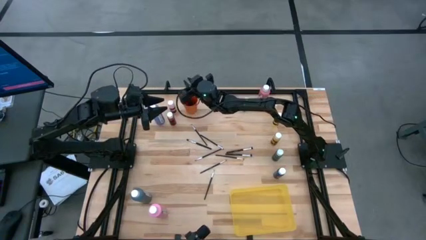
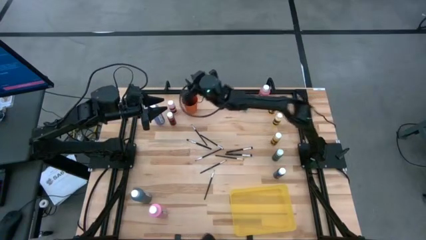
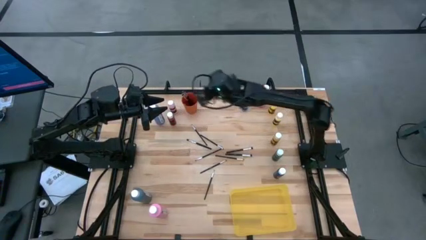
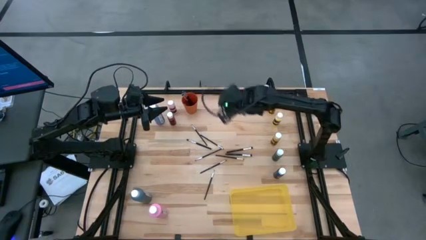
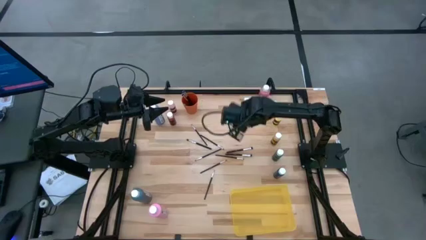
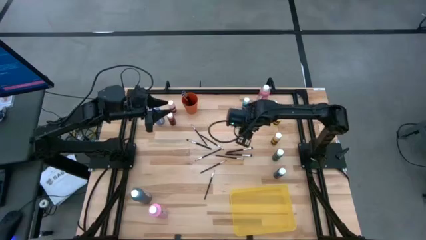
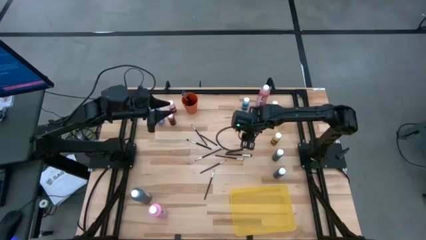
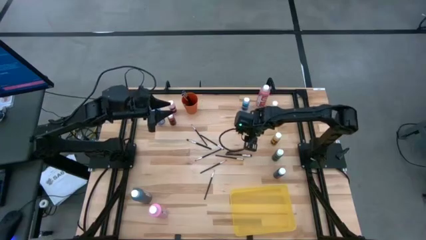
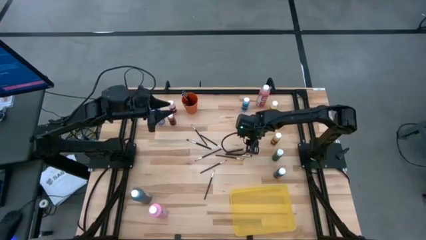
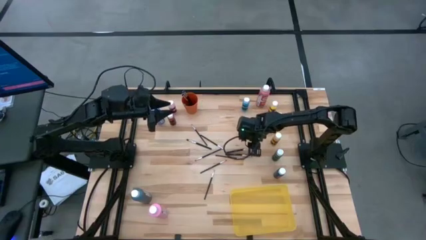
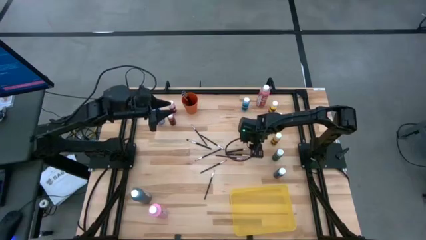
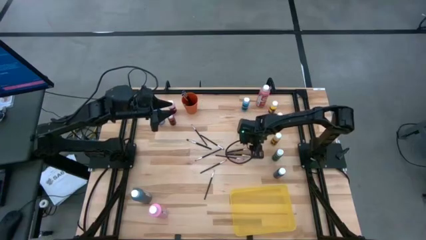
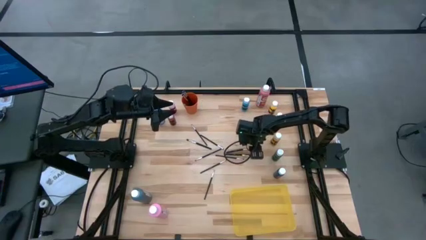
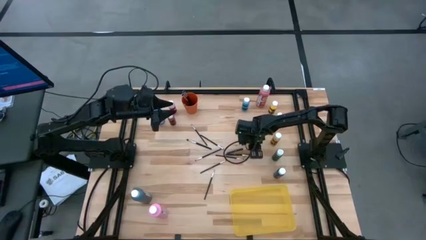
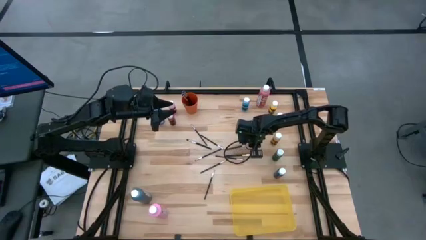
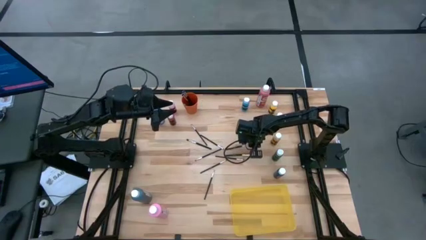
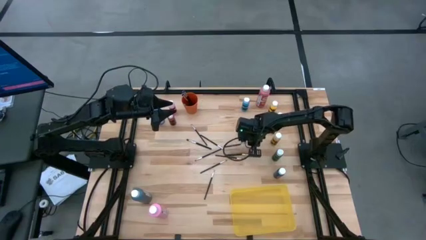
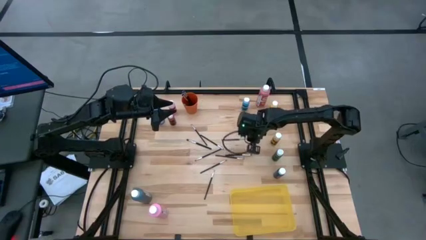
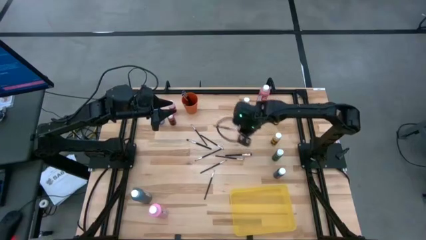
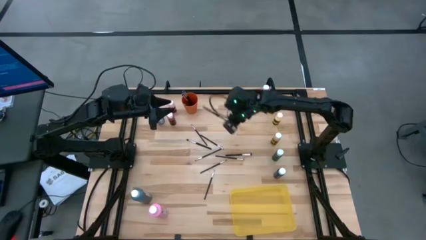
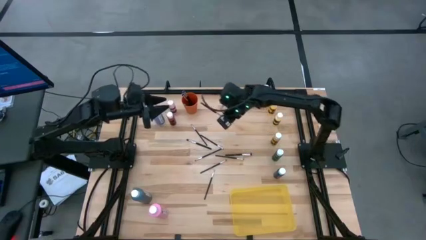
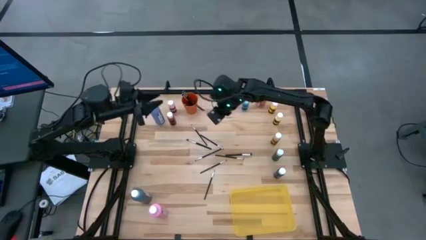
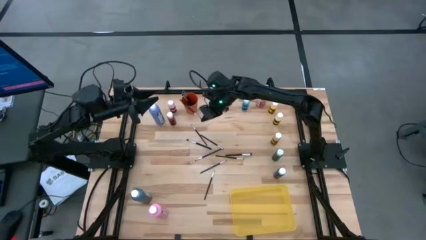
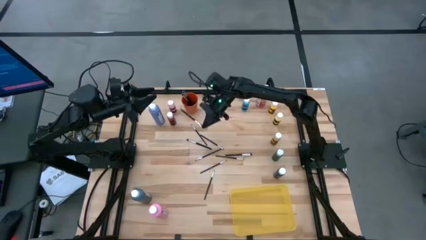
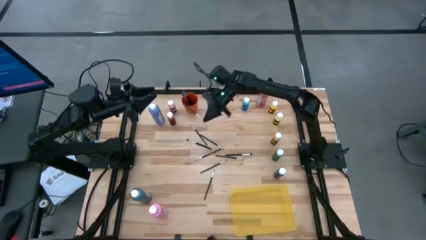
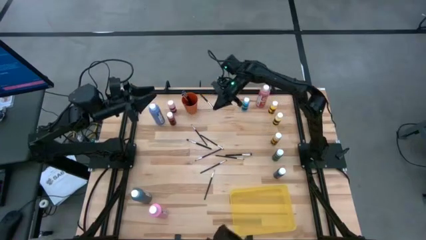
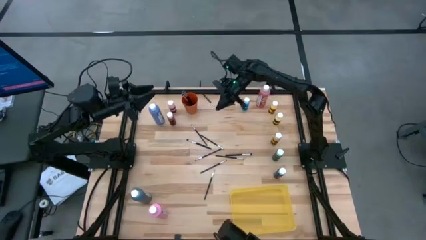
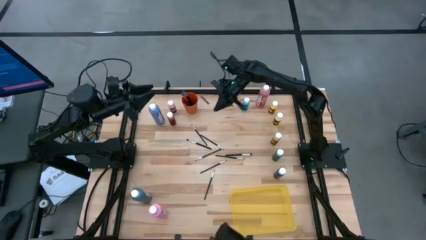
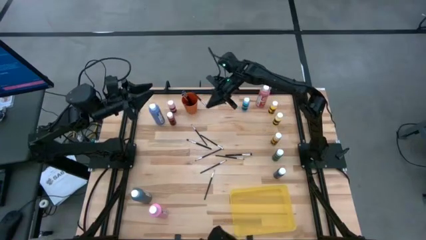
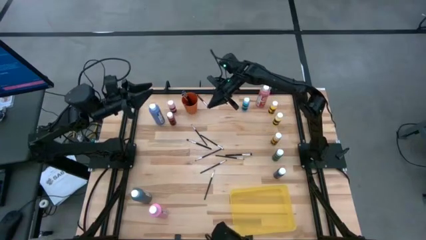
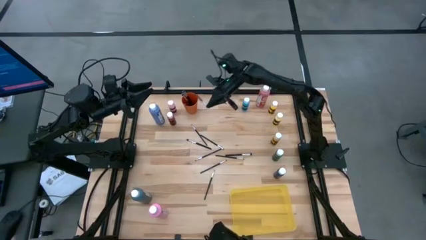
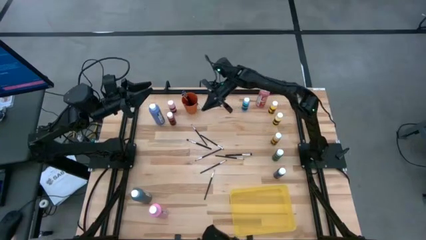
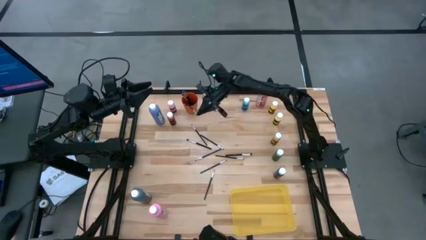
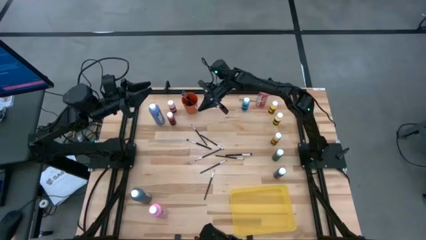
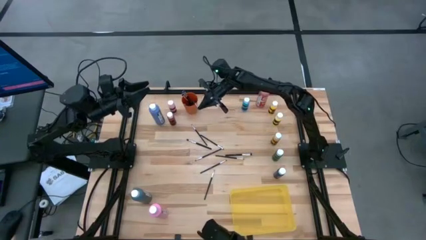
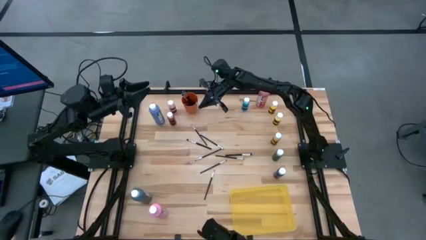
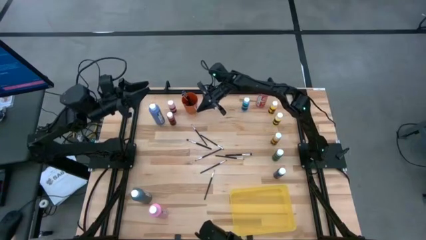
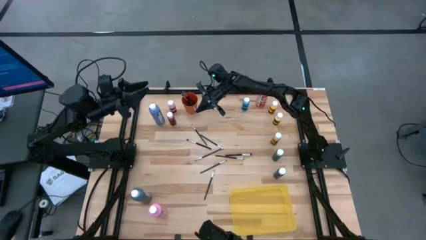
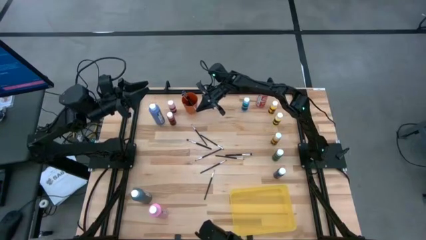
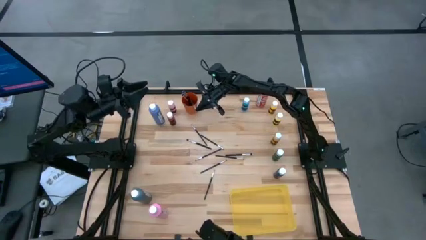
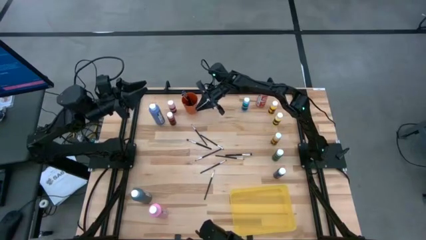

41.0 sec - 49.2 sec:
Task: Pick & Place Paint Supplies
Put the black paint brush into the orange cup

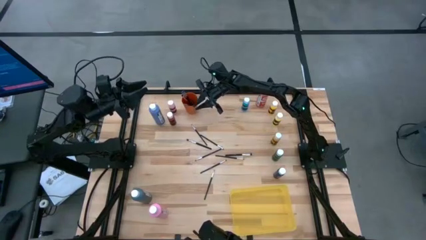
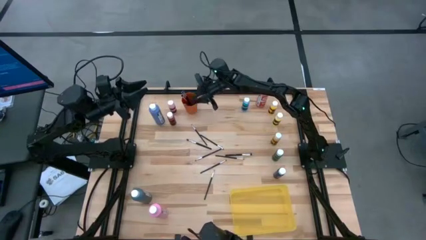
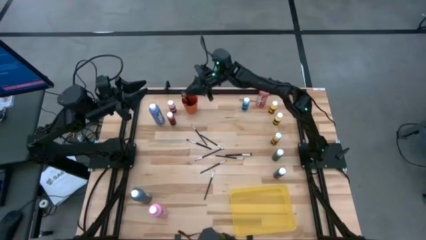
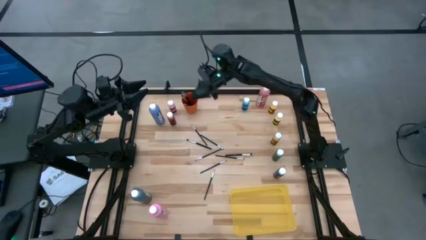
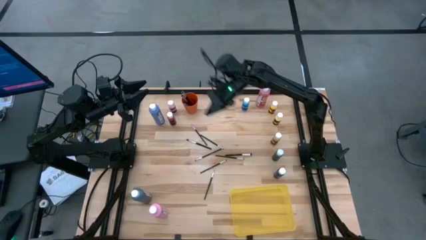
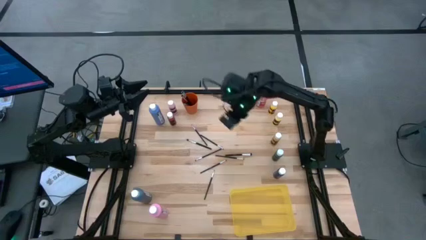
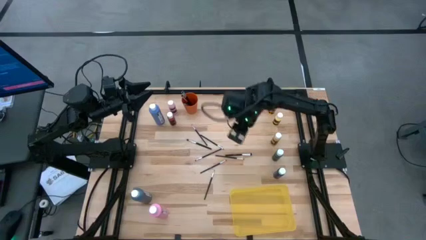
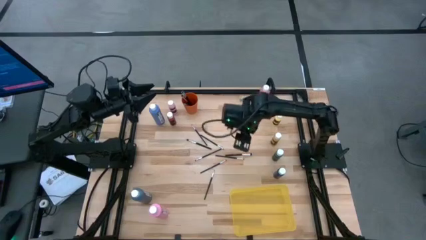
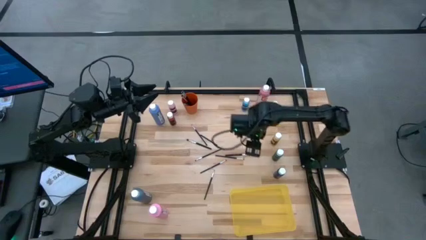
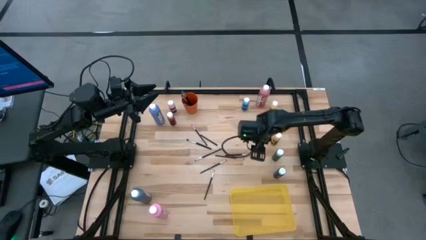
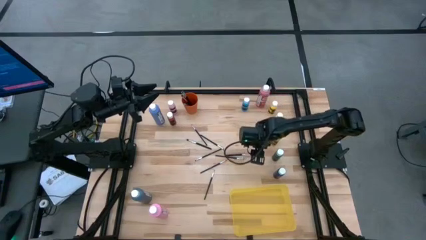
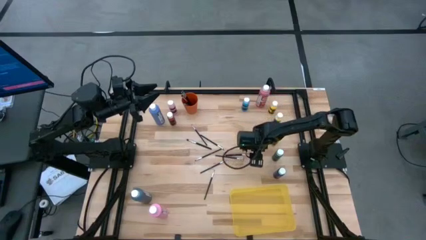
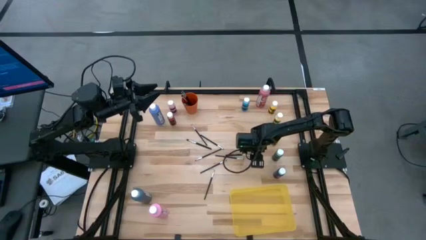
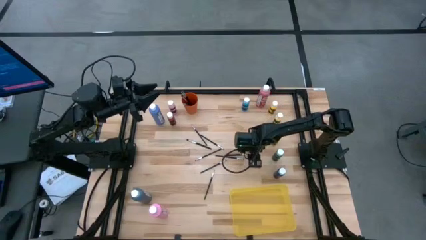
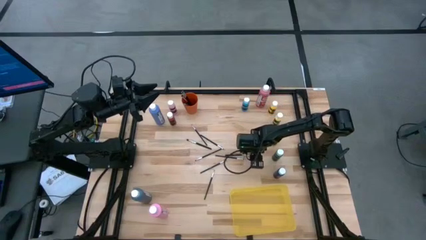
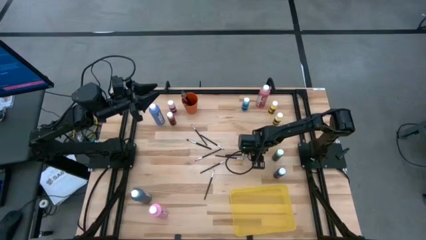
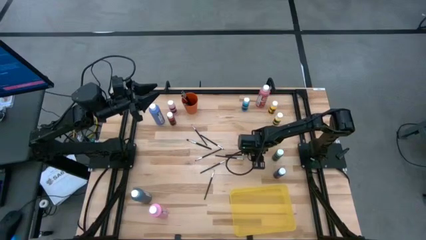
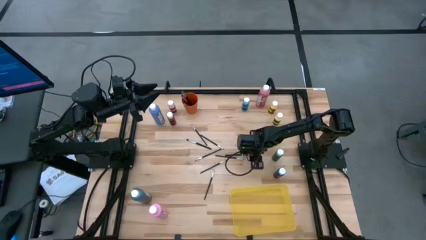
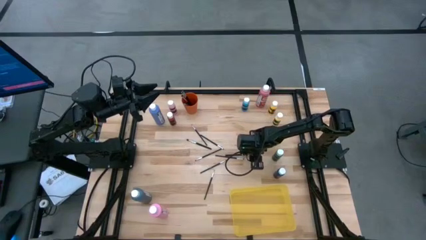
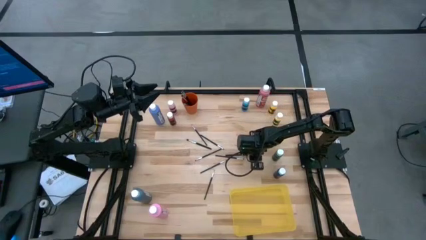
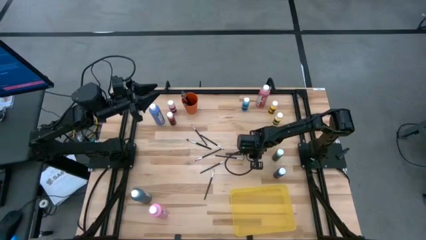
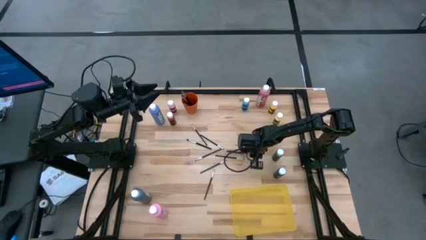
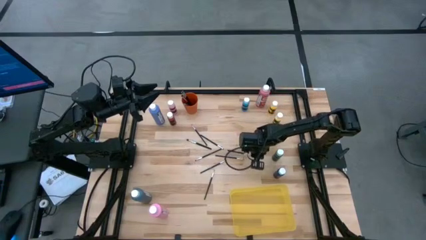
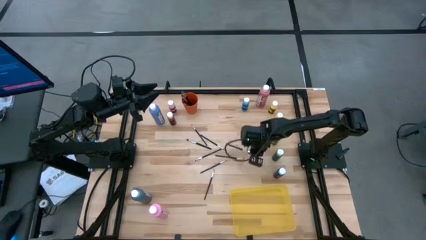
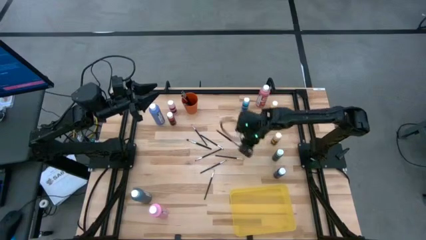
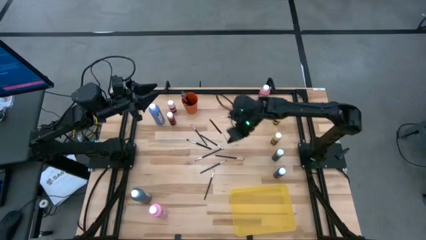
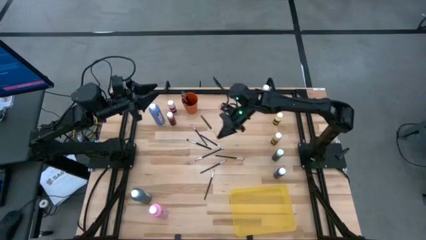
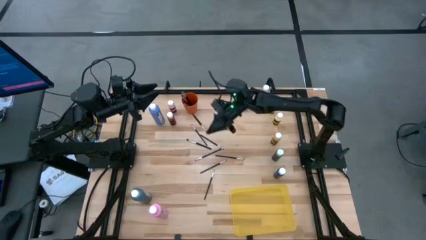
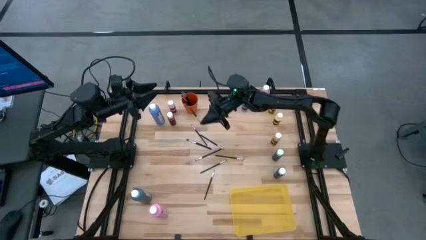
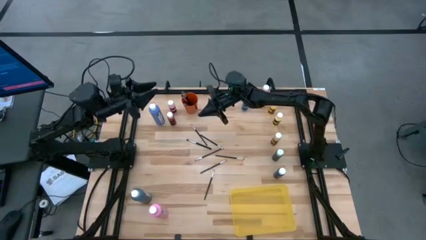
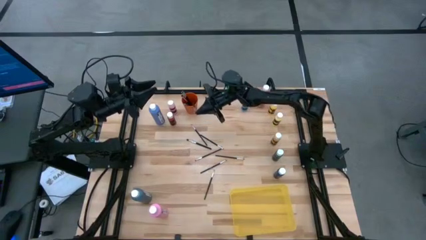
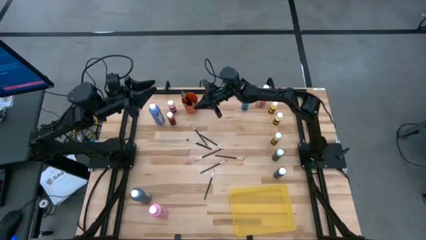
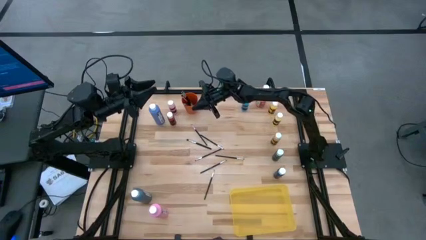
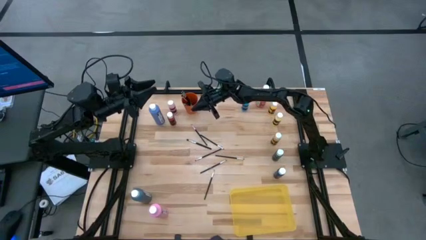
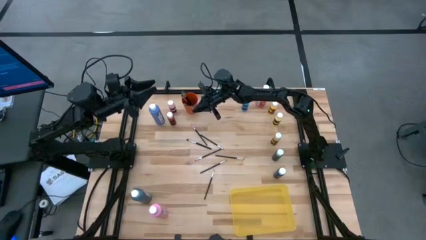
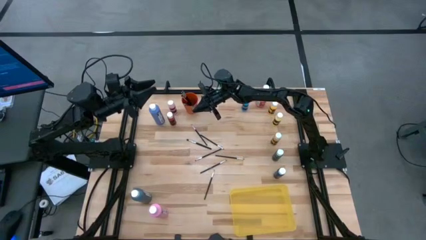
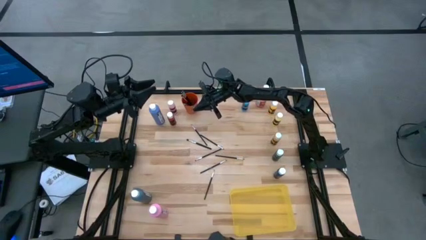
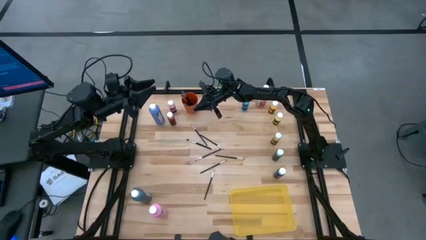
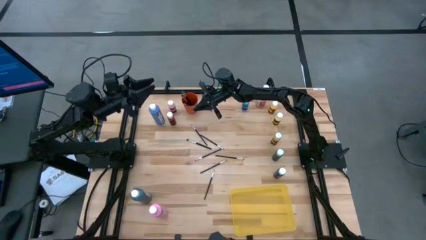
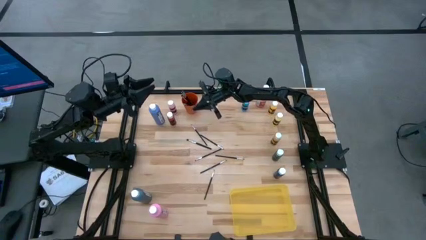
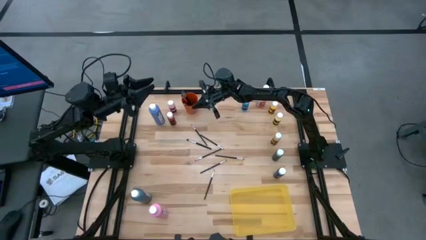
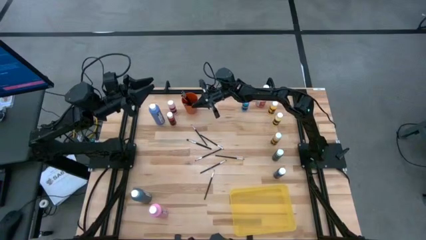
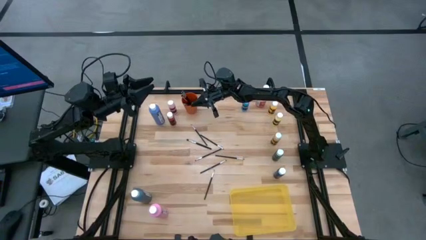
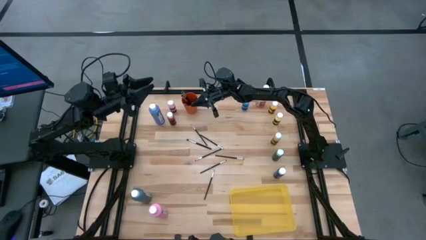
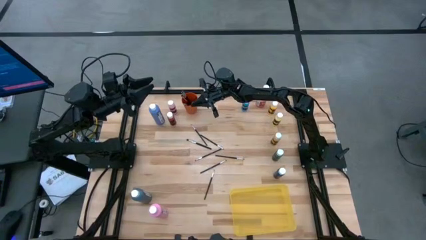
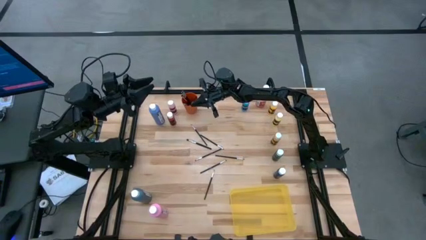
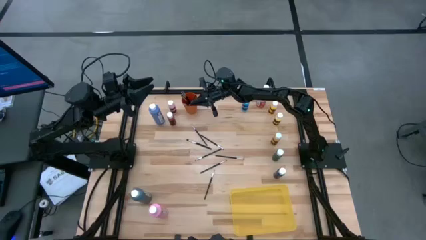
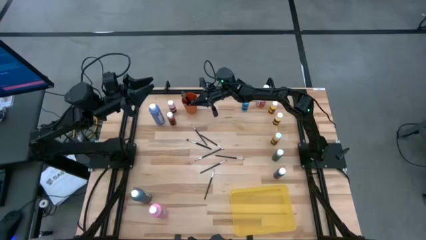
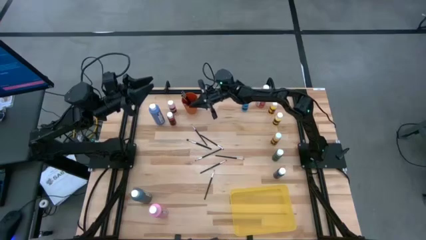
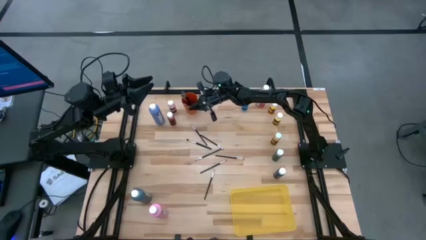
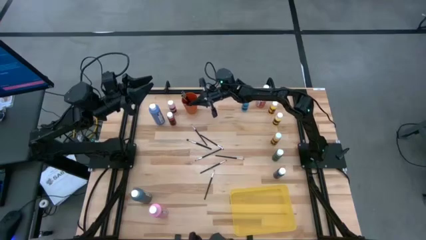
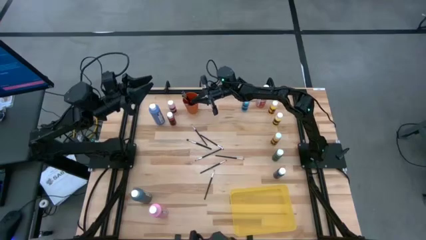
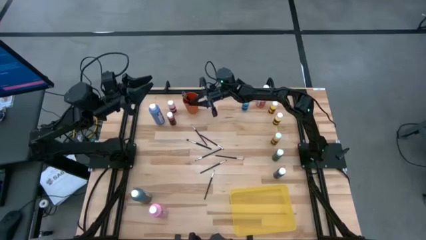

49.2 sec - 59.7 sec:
Put the black paint brush into the orange cup
